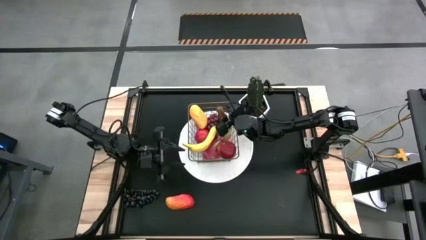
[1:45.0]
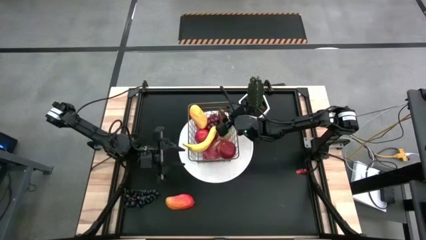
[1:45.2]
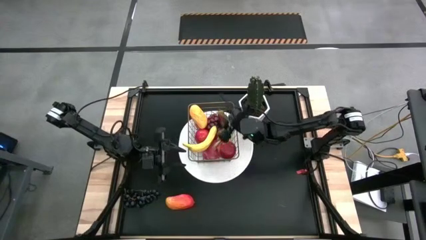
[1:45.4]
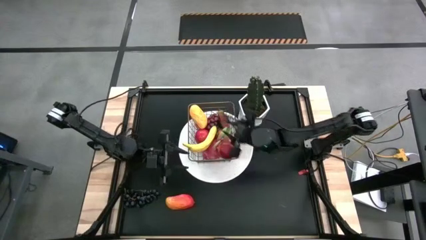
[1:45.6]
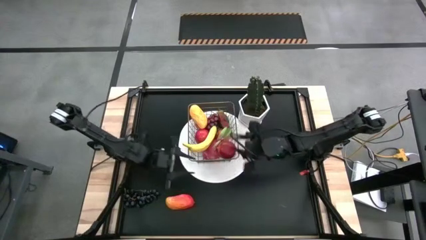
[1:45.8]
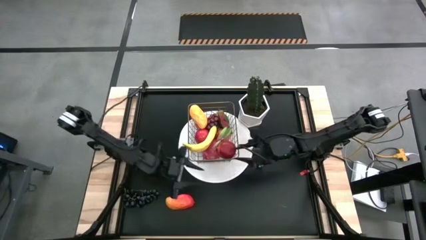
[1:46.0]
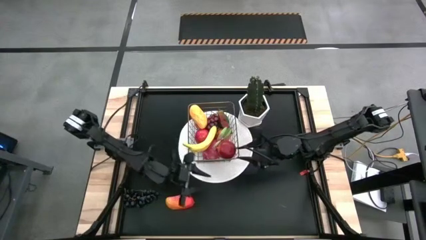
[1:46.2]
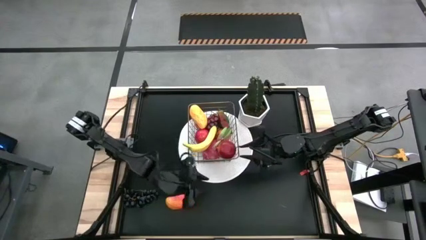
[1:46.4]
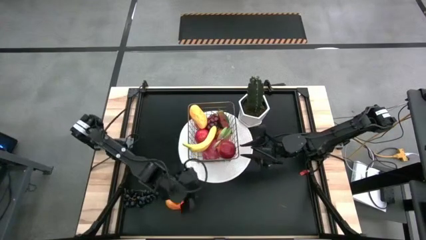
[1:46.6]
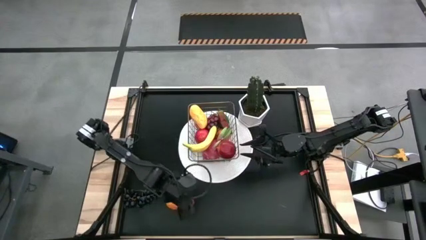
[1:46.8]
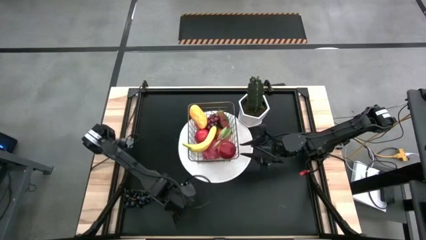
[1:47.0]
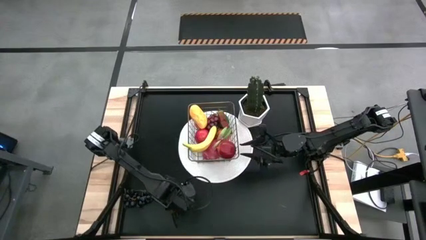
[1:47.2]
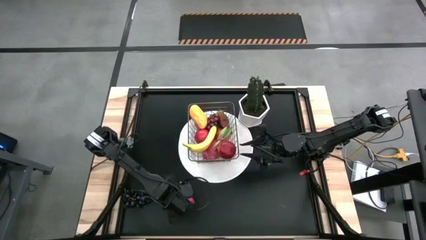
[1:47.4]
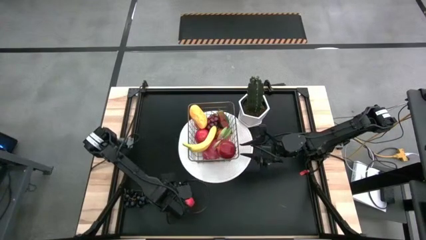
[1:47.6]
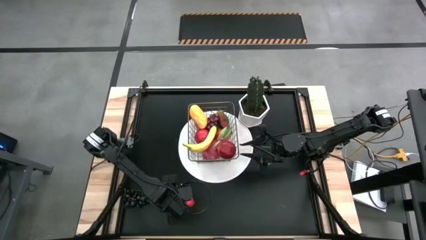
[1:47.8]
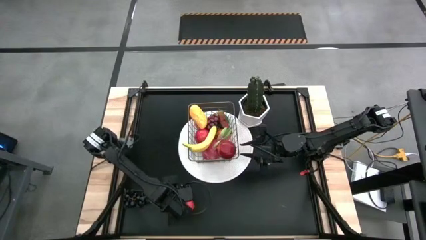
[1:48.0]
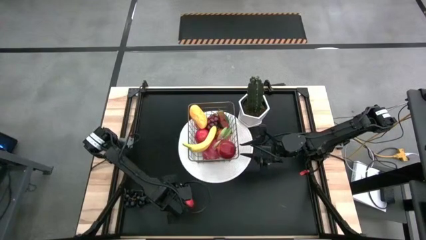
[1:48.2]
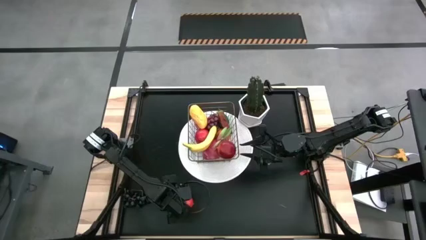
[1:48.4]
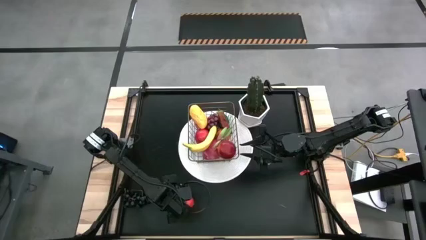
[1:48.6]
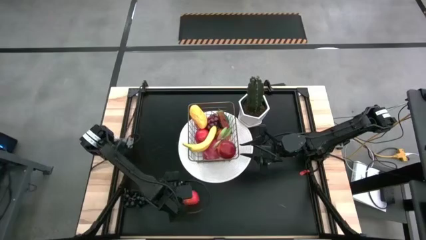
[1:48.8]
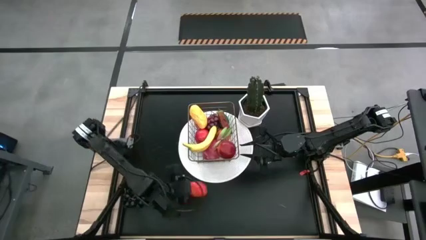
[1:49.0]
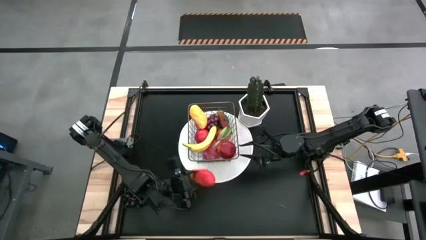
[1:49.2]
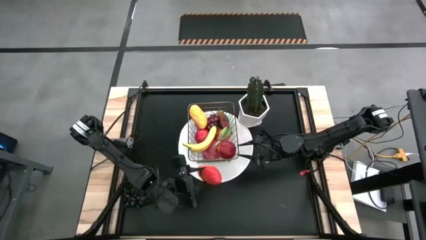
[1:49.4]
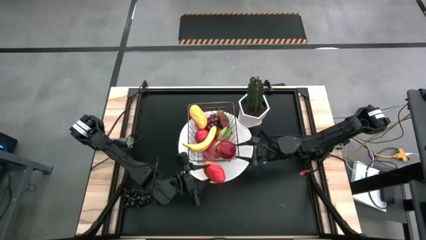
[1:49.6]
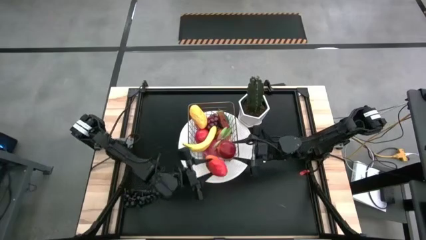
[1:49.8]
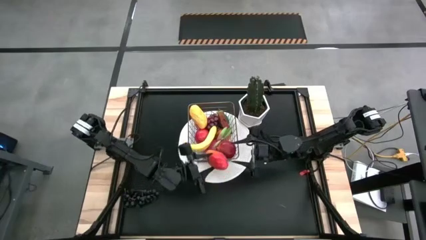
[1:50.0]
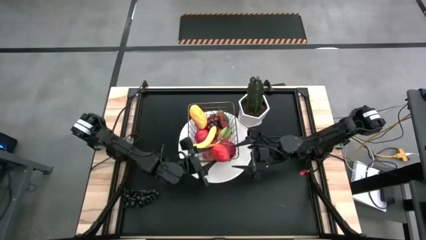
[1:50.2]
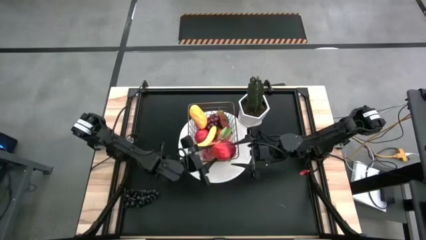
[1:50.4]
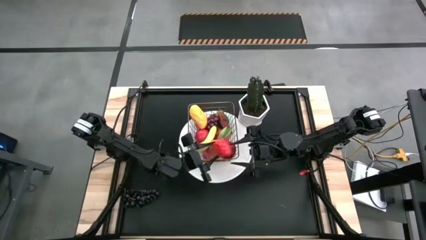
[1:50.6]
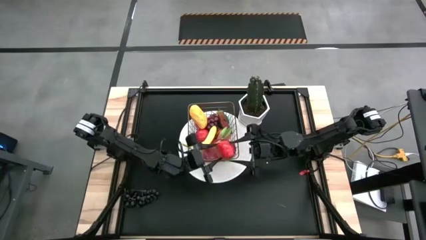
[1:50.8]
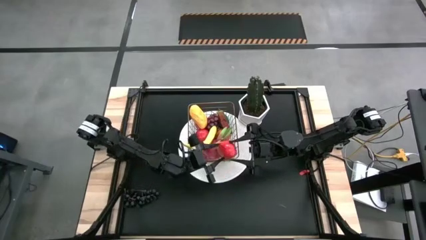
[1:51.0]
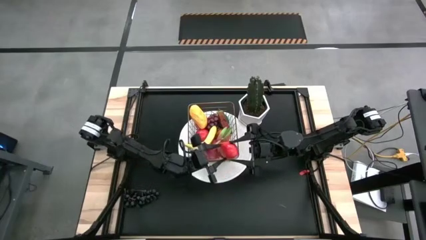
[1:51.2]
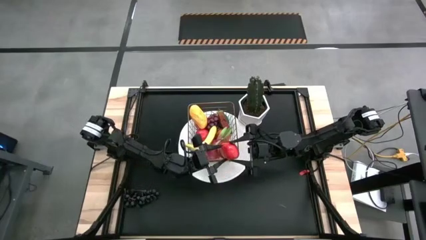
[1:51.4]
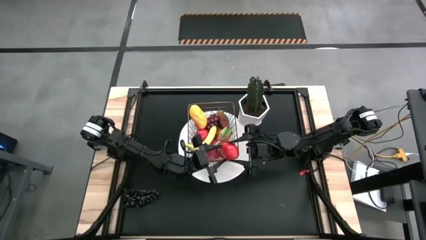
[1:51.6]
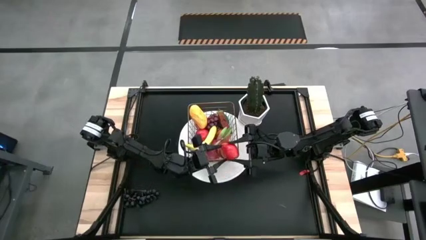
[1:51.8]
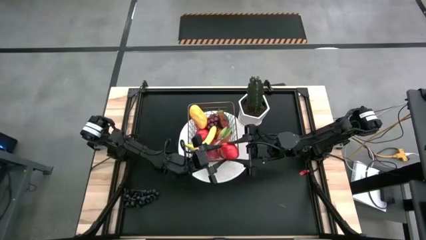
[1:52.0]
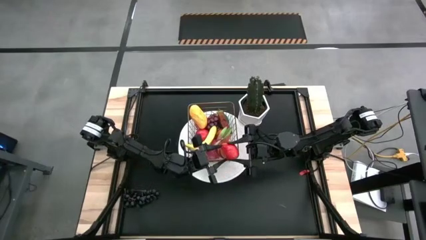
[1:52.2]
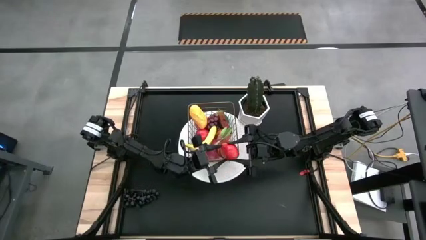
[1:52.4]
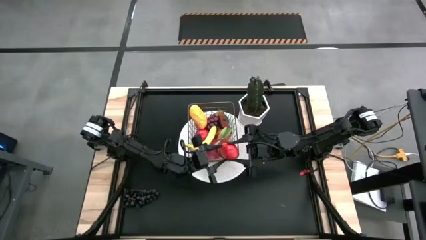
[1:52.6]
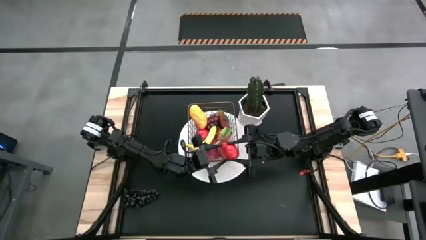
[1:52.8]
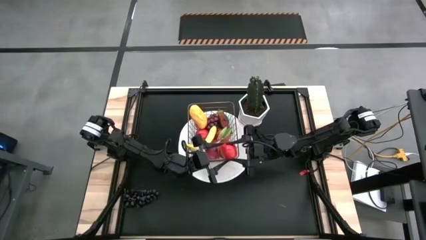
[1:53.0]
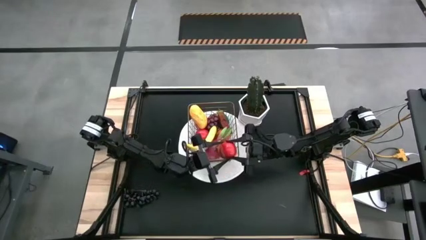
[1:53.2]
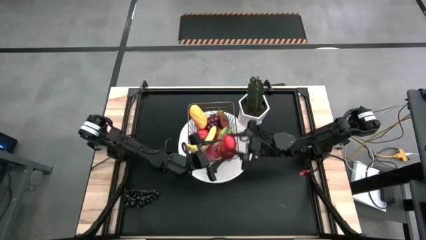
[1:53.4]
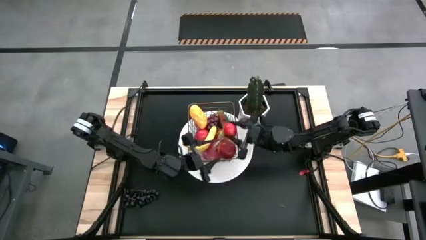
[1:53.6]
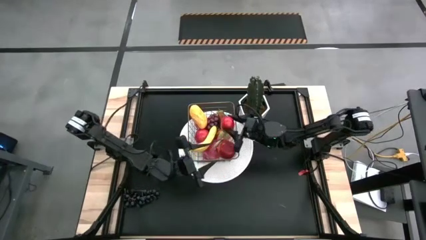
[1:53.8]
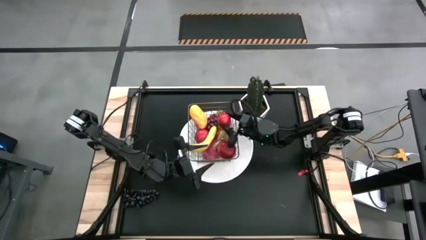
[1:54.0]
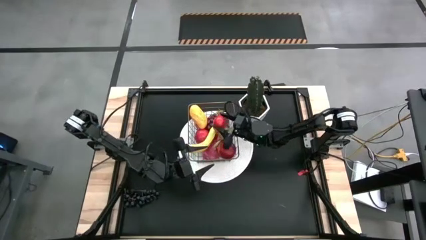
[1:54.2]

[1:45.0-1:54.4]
Task: Build produce basket
Put the red mango into the gold wire basket

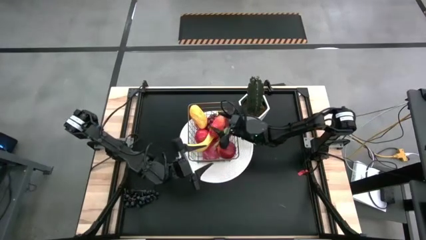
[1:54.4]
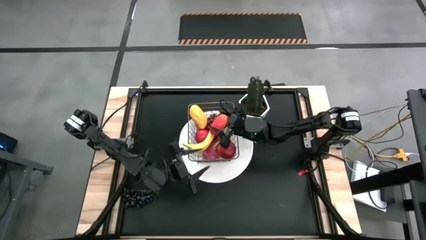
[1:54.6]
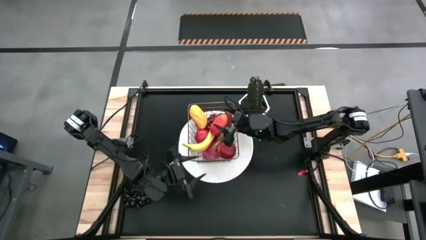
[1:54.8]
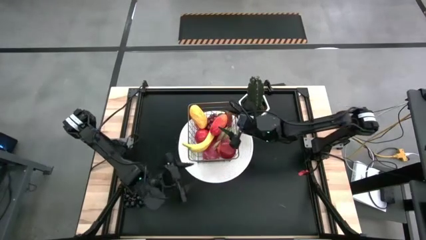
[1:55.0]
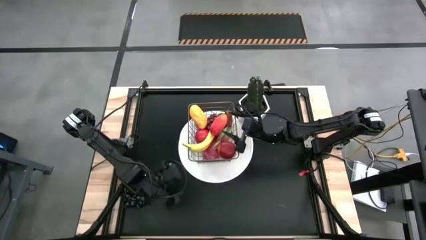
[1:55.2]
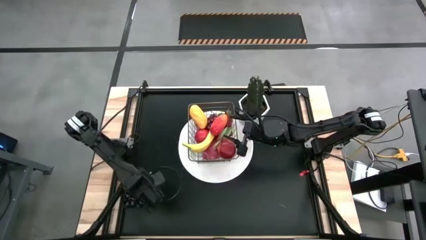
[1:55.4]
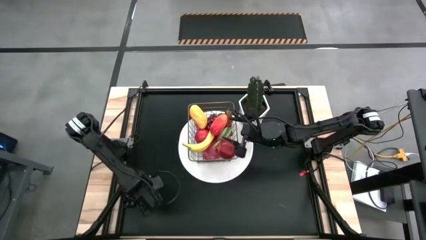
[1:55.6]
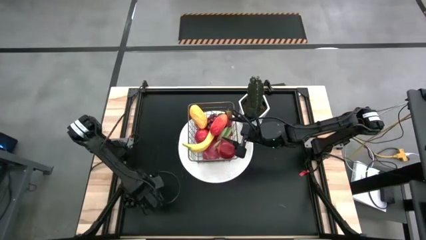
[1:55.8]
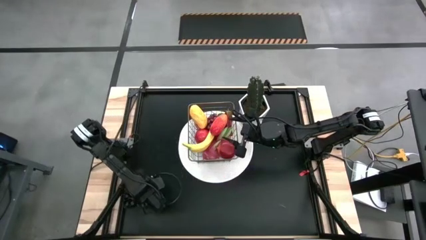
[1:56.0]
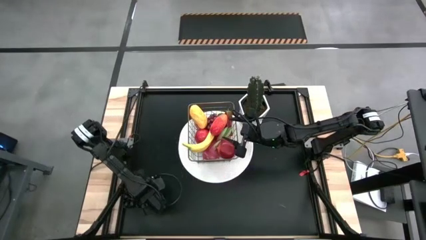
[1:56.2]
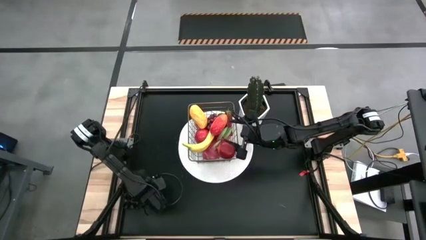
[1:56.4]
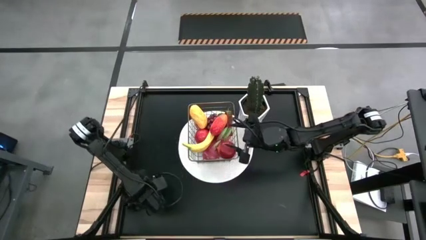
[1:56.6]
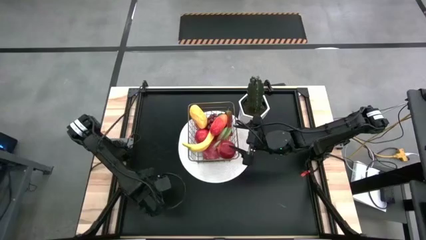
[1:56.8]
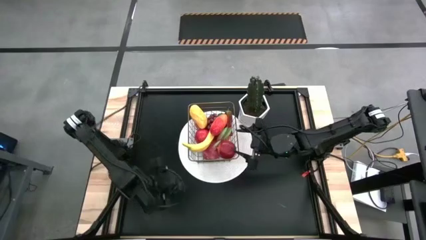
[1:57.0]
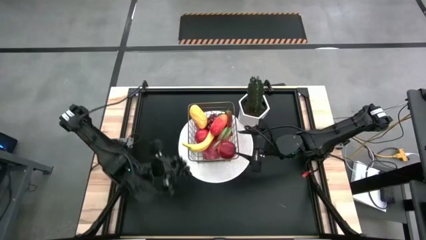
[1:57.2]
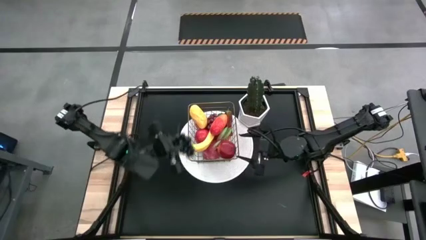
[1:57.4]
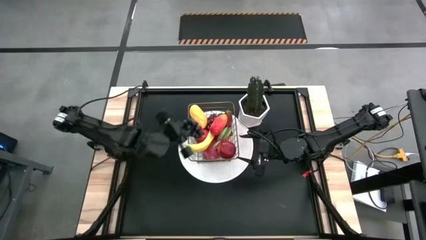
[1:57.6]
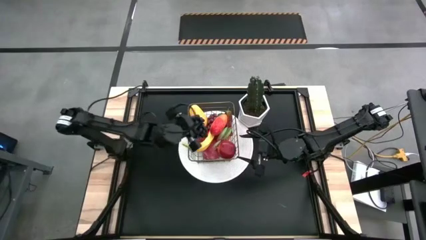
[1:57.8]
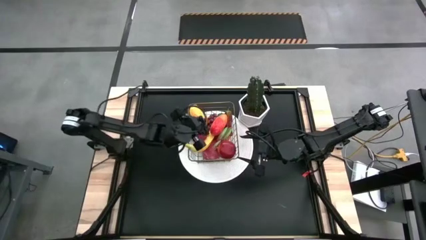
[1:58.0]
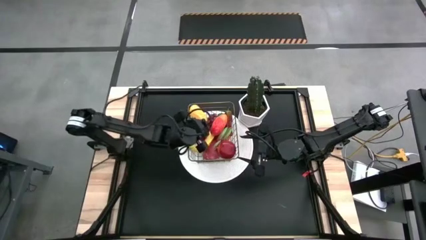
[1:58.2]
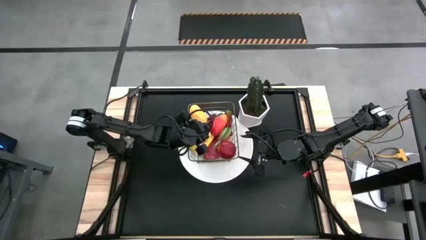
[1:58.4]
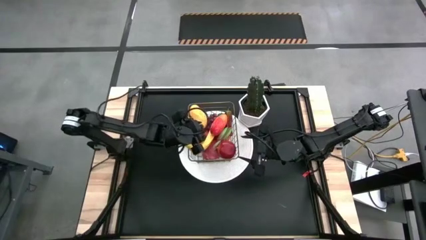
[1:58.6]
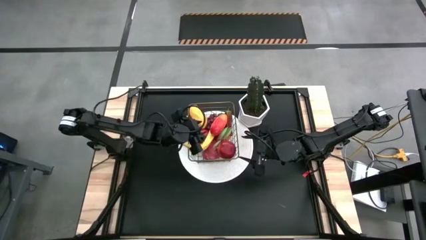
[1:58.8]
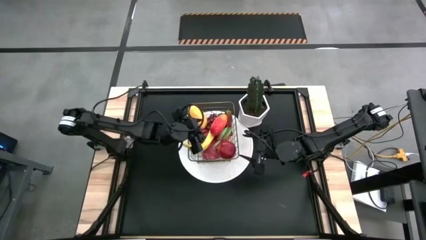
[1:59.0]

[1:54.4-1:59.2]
Put the black grapes into the gold wire basket

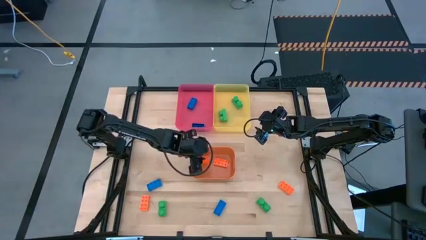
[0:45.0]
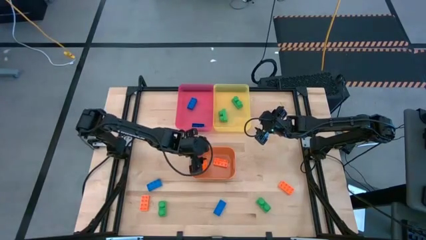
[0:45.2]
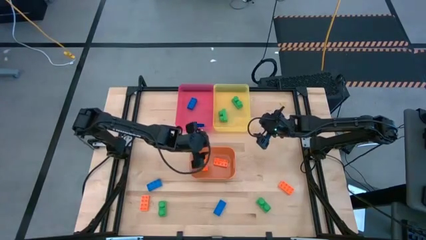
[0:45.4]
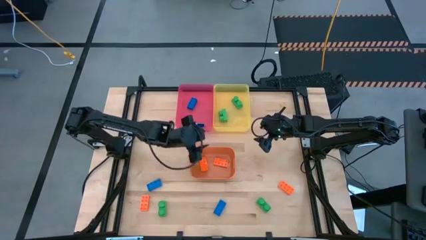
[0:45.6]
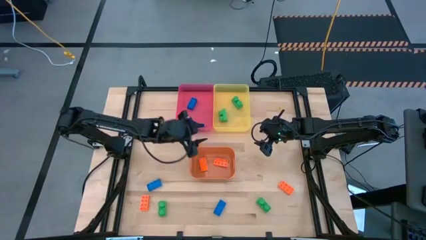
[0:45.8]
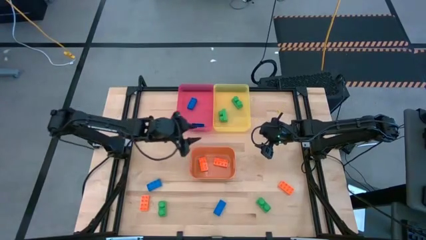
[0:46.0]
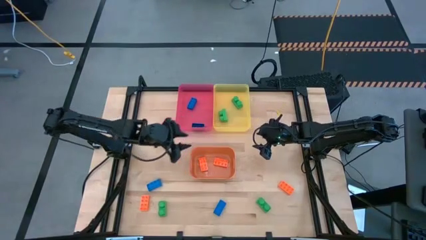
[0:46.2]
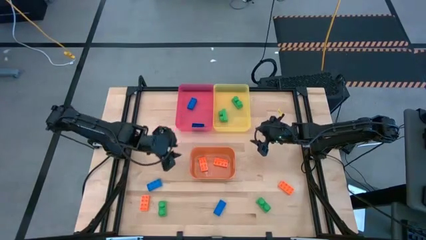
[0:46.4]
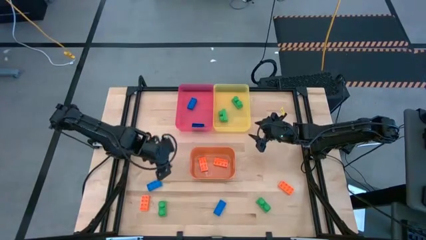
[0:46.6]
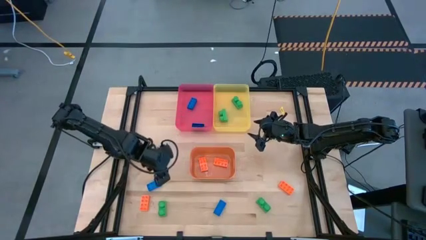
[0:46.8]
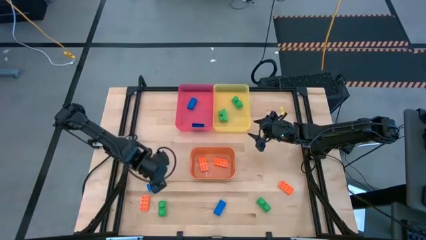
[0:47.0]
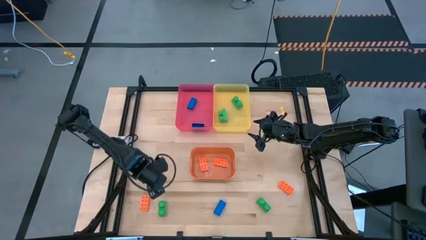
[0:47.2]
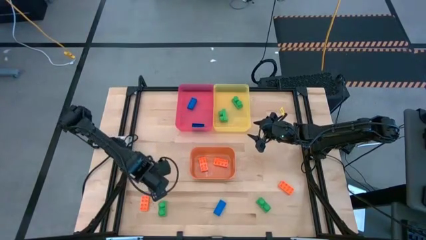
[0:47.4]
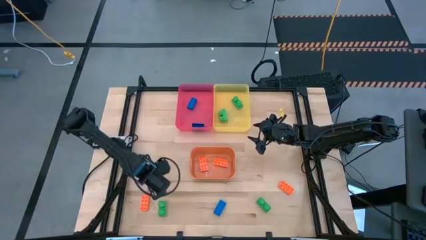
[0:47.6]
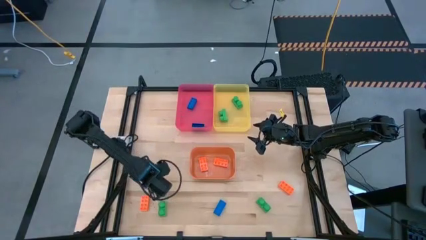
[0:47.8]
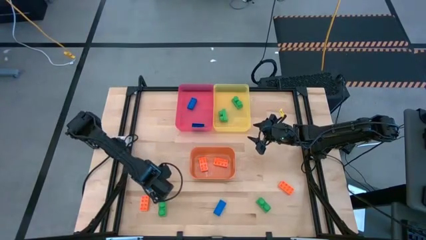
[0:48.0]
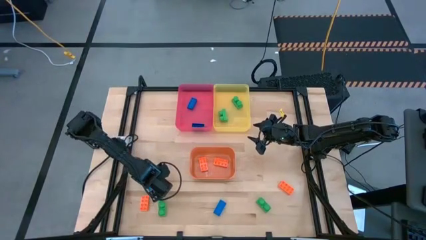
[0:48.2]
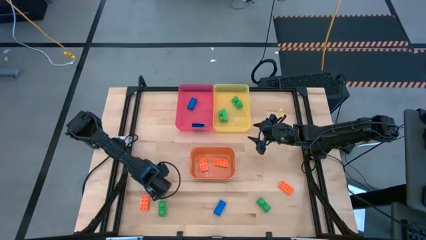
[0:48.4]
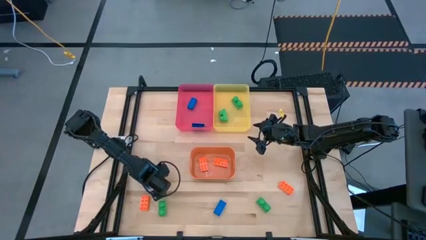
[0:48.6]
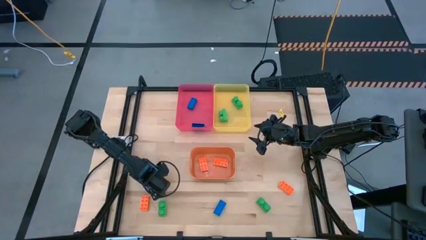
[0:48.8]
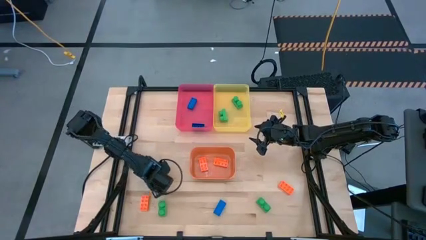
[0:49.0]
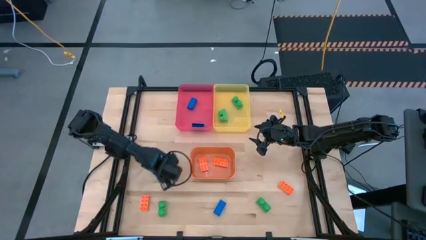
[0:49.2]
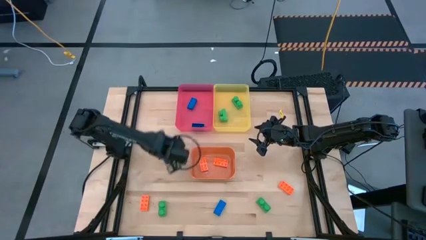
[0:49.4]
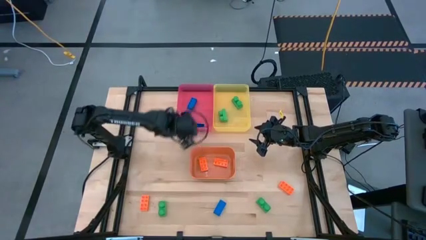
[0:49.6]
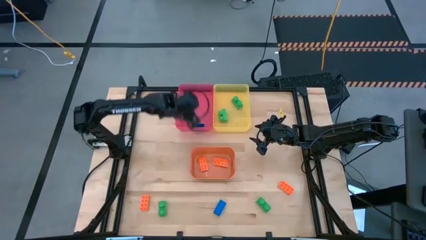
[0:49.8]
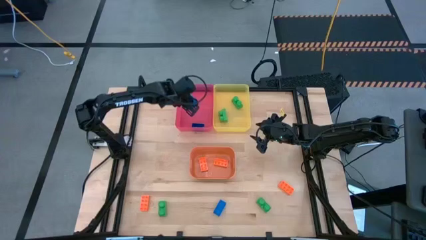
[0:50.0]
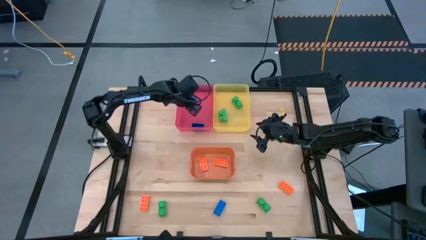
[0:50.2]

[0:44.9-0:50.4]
Task: Sort & place blocks by color
Put the blue game piece into the red bin
